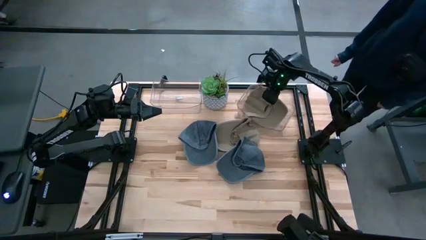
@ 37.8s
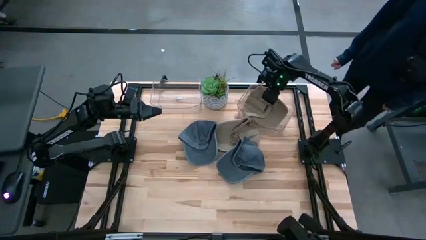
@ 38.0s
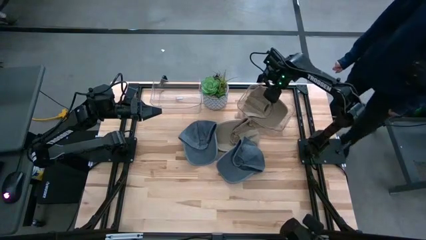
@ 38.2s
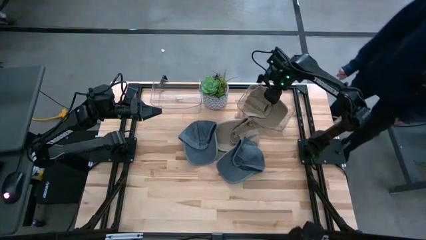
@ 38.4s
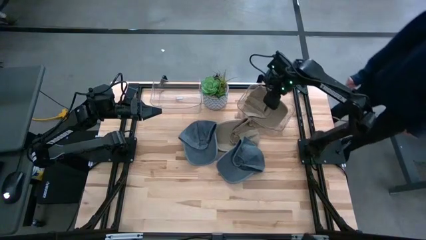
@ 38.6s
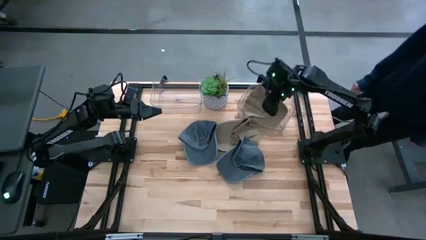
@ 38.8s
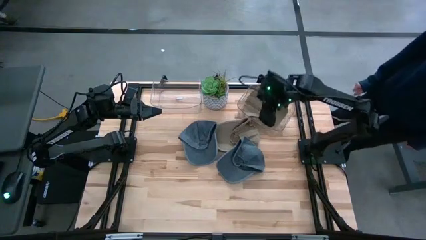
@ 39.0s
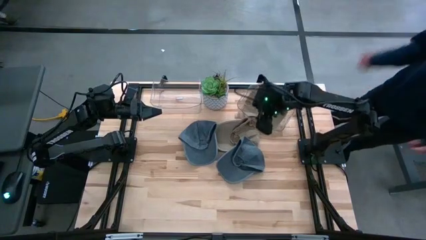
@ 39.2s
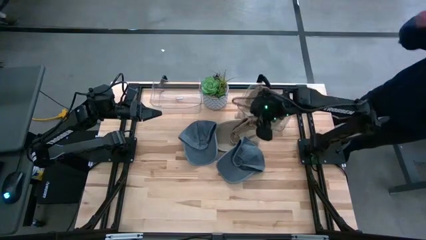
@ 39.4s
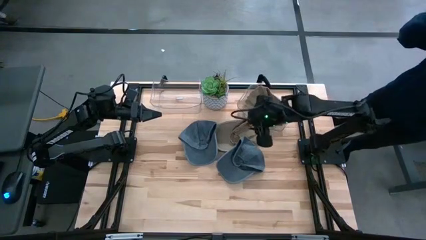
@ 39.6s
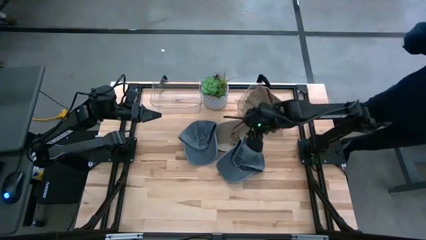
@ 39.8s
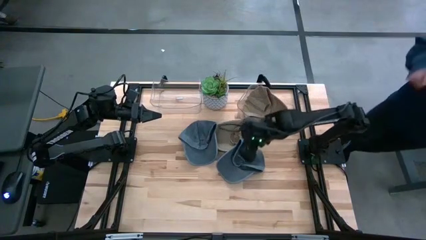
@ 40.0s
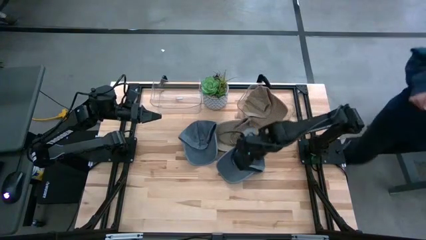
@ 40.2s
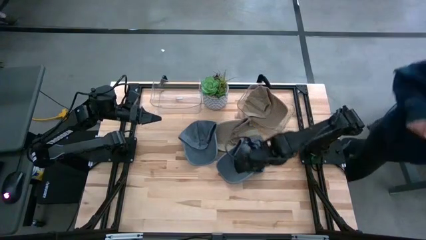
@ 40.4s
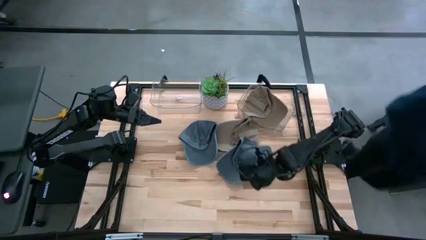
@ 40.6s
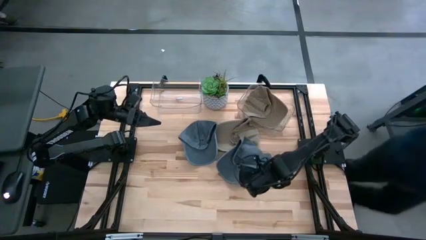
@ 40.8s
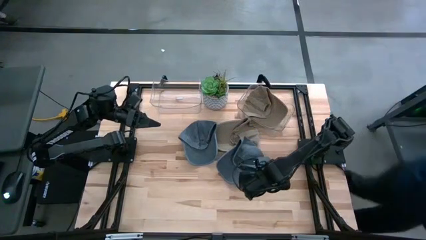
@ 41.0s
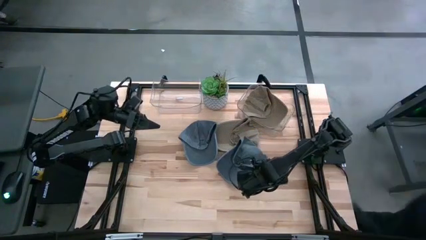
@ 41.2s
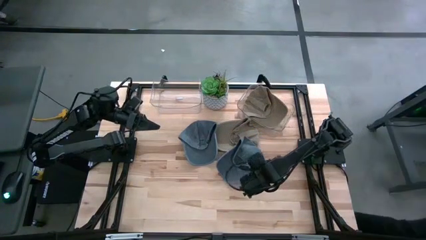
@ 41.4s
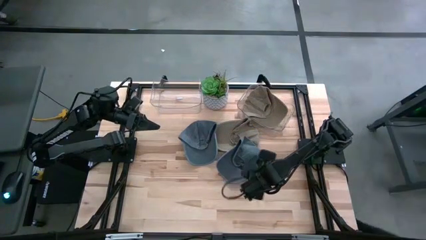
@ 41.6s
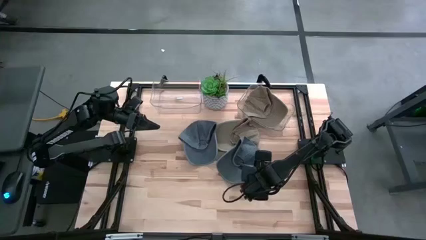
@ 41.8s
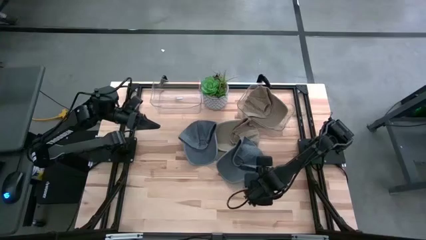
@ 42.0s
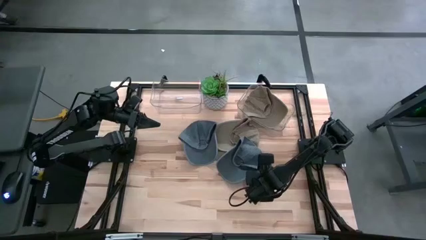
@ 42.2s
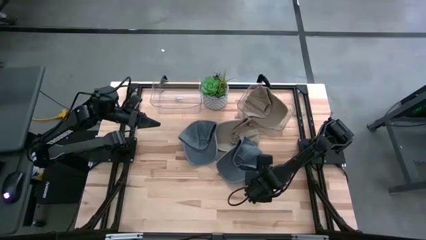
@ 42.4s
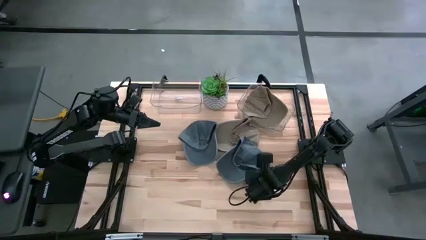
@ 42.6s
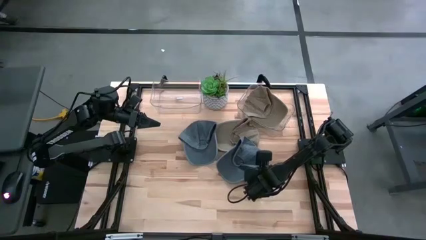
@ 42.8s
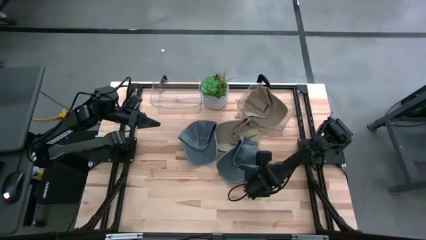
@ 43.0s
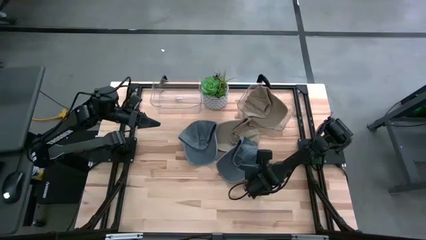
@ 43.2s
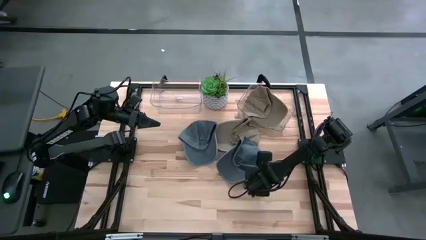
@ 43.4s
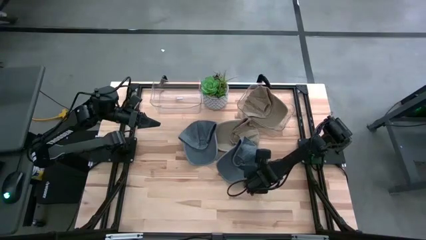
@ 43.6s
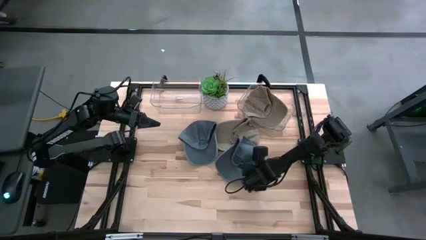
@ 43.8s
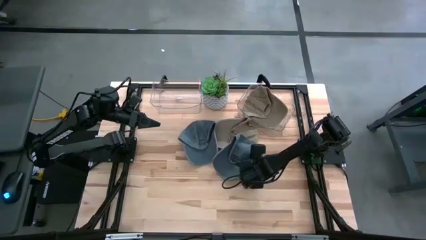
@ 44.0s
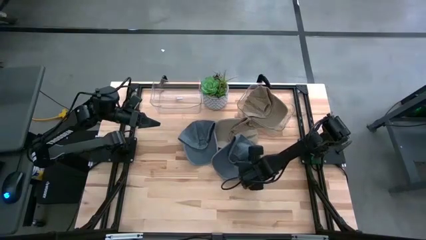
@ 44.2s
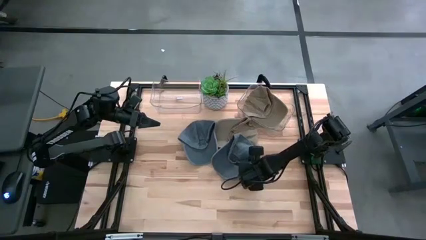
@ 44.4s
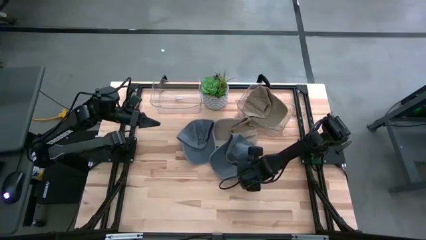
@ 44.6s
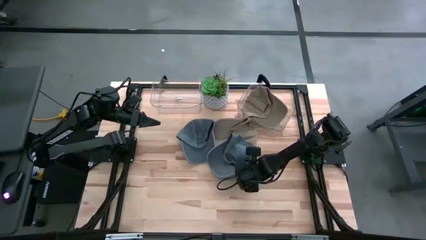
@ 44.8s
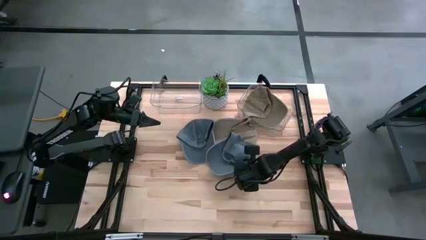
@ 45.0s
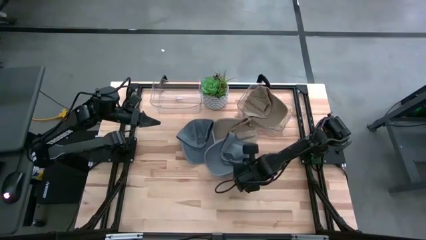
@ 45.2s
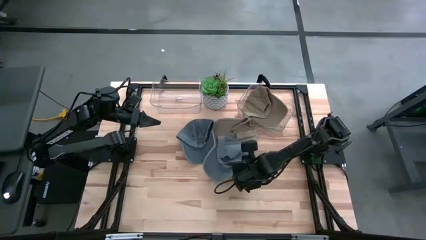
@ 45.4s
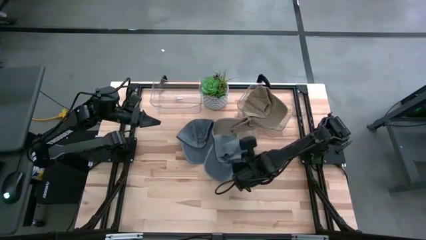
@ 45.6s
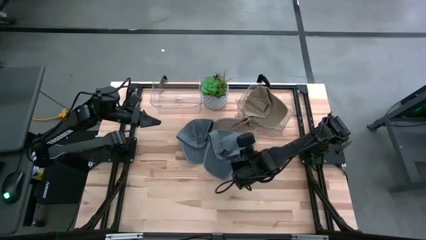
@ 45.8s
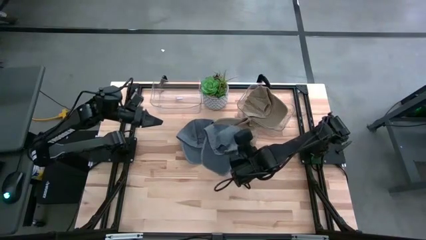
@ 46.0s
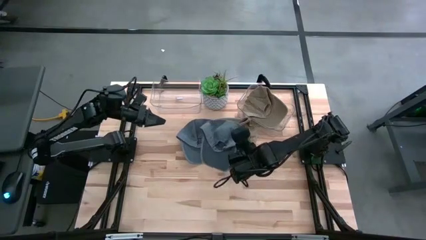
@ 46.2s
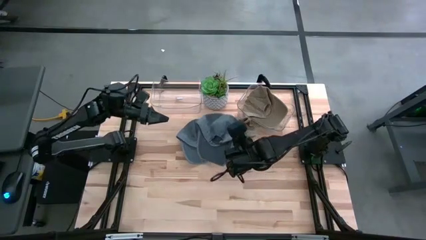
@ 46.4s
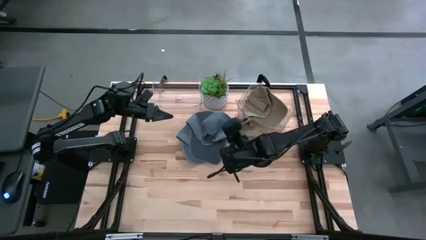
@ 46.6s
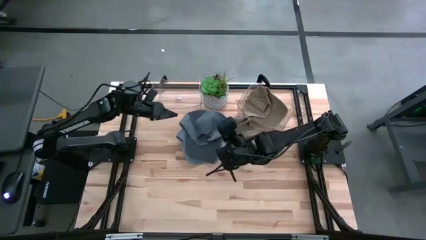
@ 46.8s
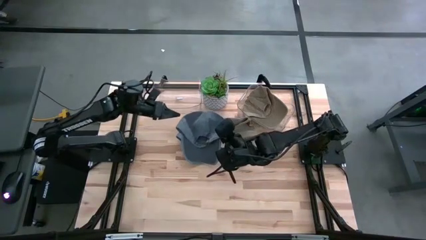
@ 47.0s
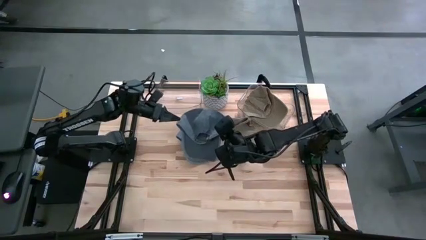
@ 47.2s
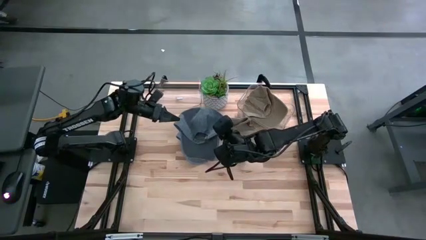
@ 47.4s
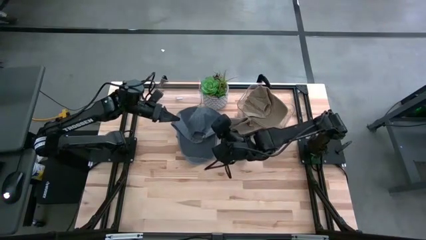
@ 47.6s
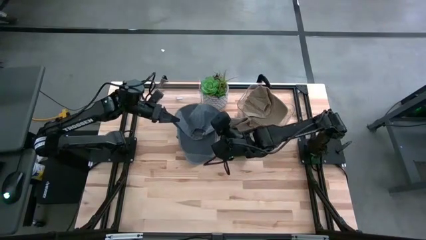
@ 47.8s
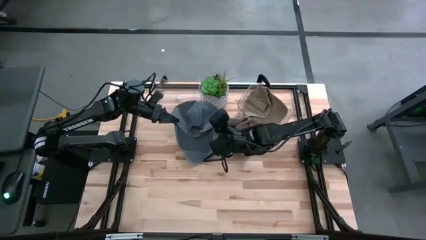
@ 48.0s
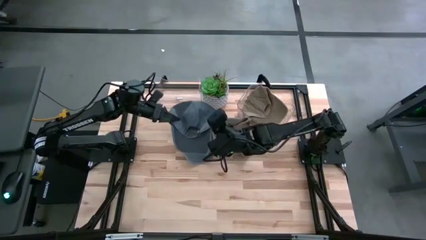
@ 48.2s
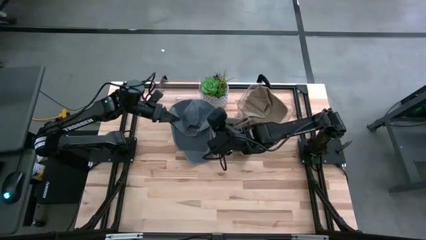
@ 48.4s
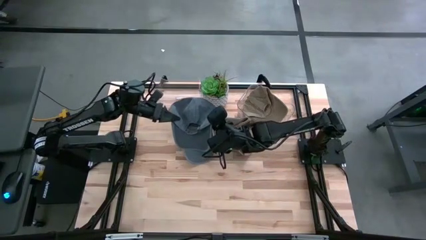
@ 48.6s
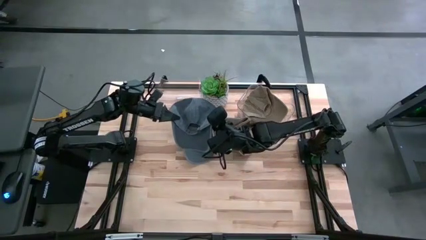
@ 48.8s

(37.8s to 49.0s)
Task: Pick & Place hat
Put the right blue cap into the left transparent bin

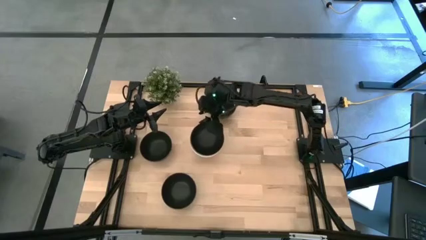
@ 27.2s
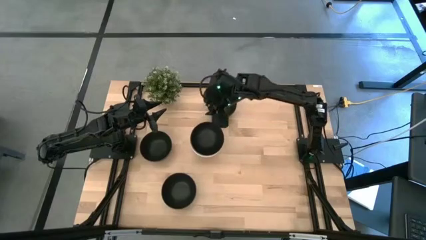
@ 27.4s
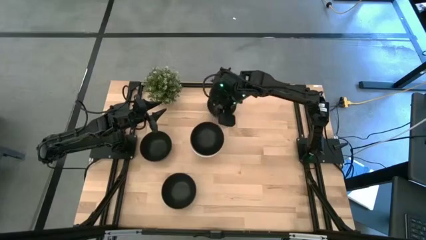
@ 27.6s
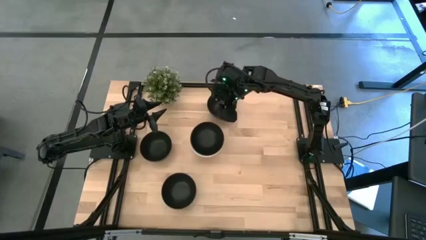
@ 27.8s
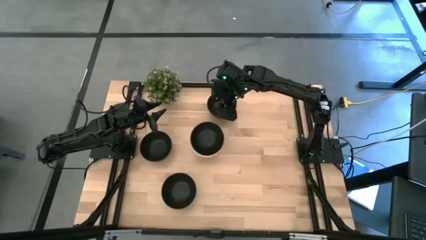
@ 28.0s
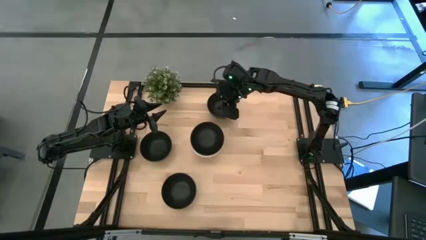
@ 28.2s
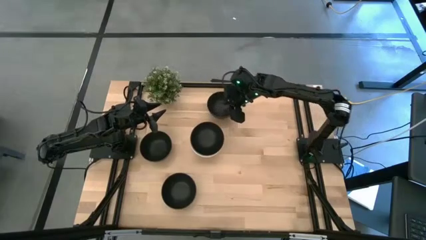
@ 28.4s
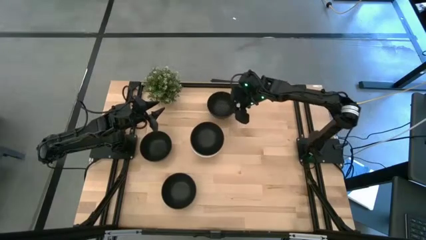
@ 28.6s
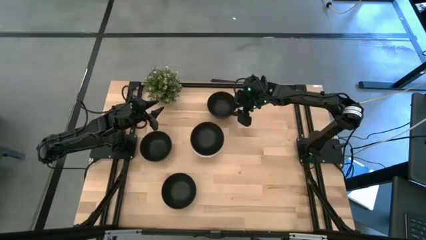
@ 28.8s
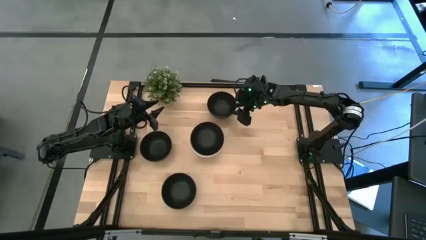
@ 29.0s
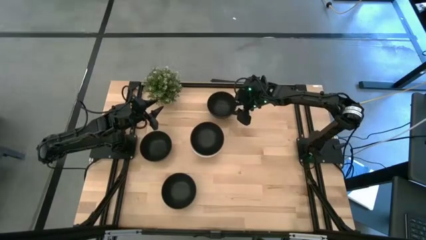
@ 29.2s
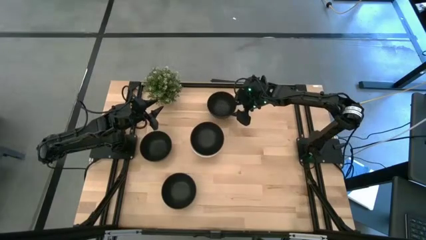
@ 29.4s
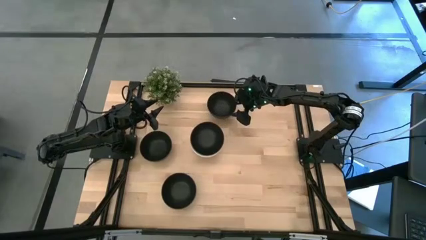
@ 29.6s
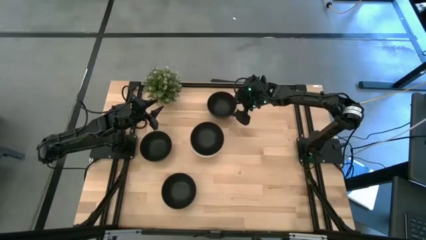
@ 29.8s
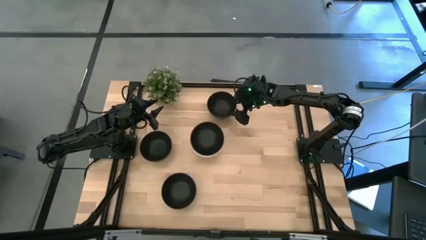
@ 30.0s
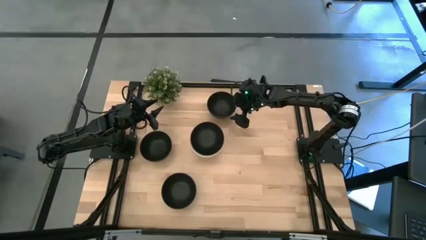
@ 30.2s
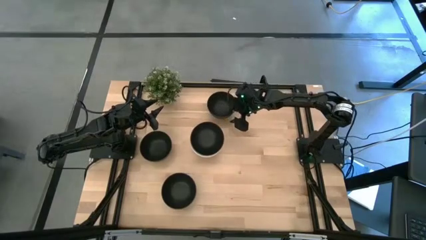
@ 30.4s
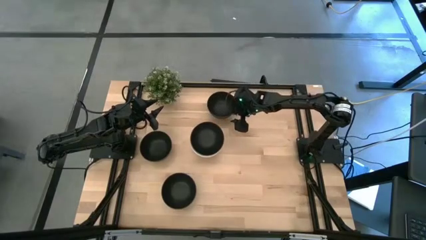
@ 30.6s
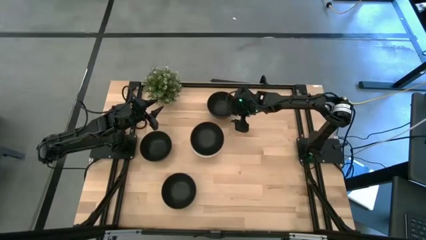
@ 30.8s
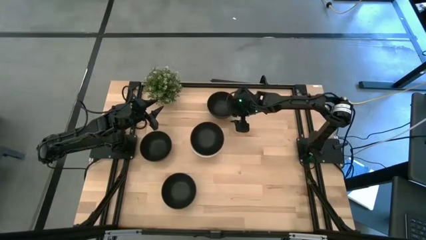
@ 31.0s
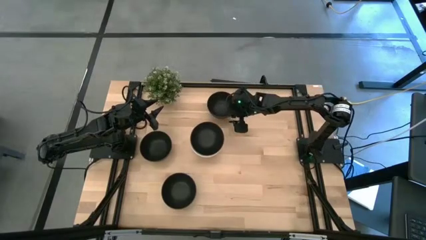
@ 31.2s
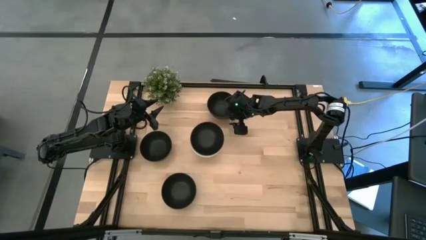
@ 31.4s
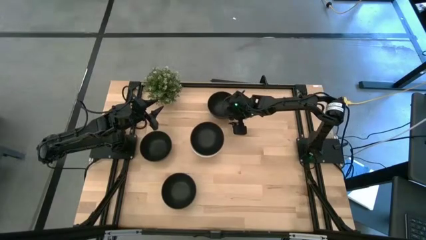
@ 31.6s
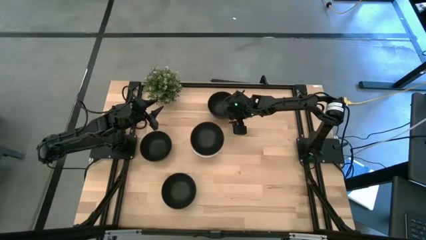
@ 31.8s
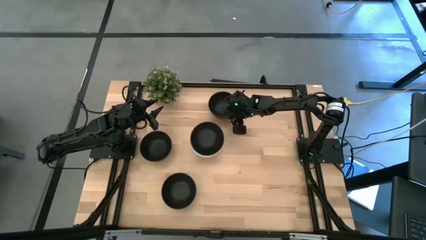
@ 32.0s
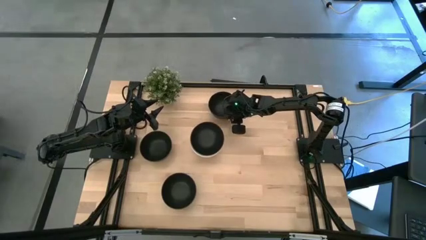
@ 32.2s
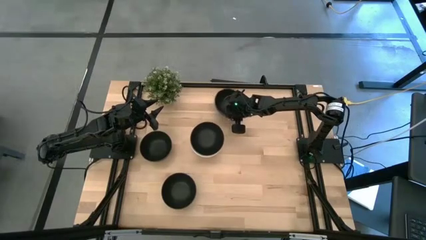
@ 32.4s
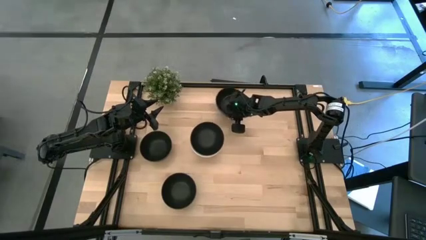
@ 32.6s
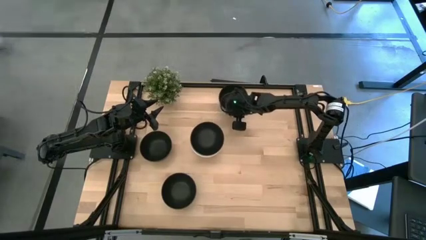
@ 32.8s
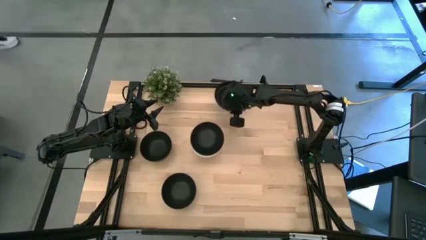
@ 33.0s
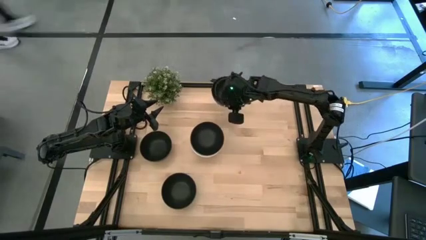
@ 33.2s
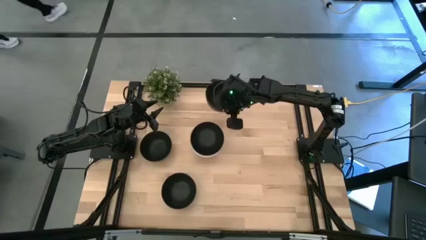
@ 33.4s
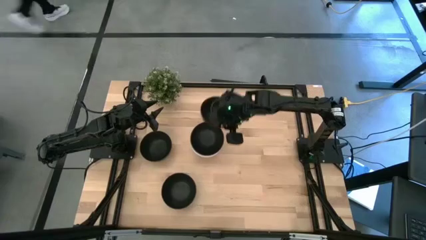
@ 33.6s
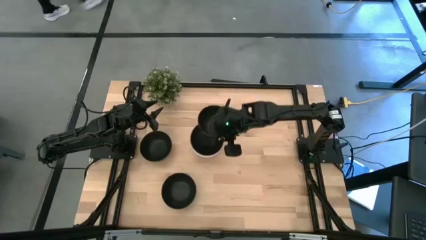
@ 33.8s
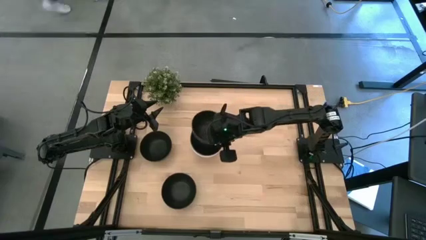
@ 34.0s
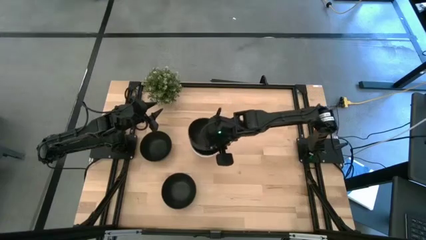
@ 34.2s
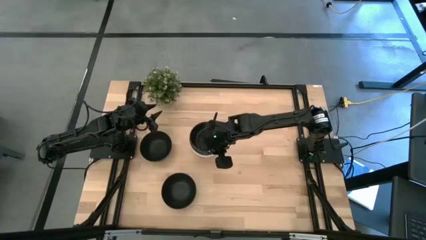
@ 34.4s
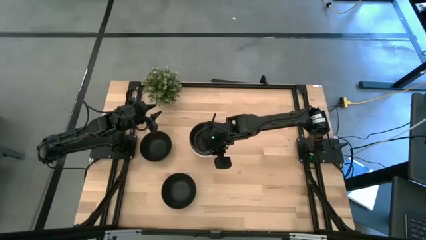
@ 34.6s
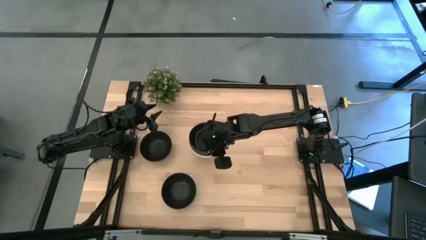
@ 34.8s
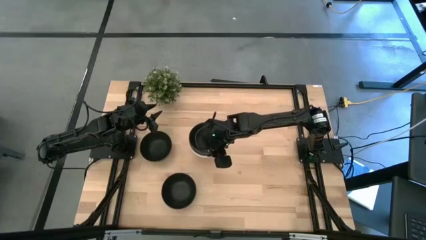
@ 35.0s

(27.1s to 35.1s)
Task: Nest bowls inside each other
Stack the black bowl on the black bowl
